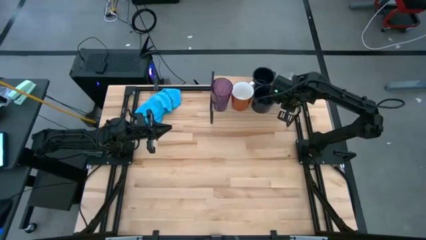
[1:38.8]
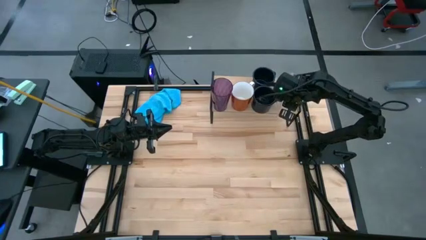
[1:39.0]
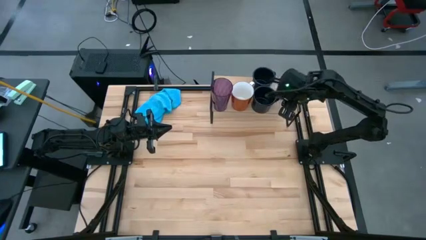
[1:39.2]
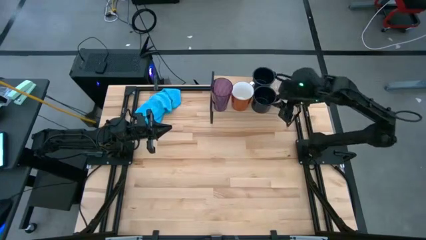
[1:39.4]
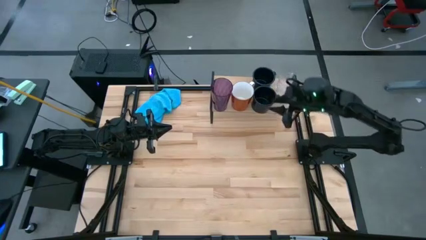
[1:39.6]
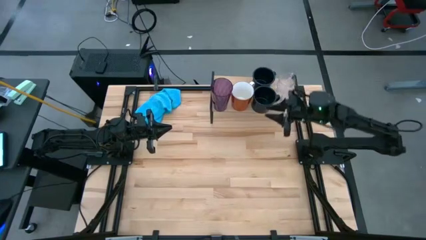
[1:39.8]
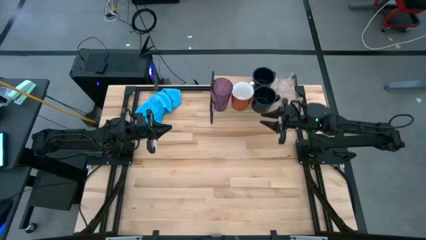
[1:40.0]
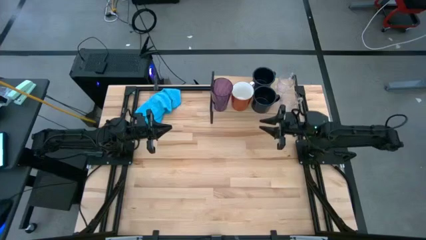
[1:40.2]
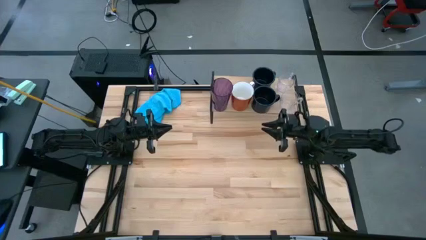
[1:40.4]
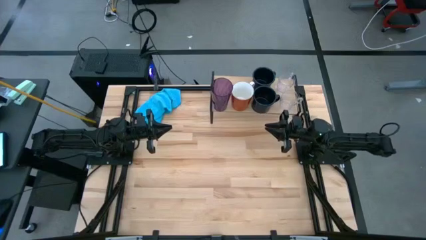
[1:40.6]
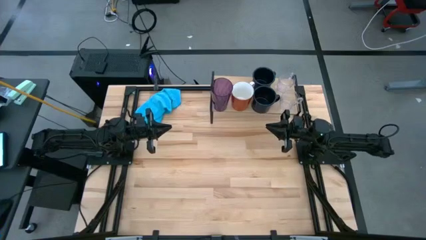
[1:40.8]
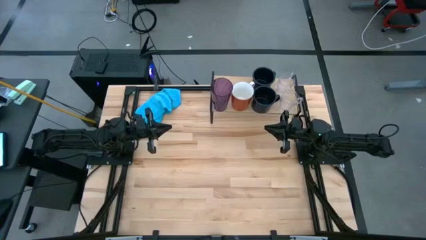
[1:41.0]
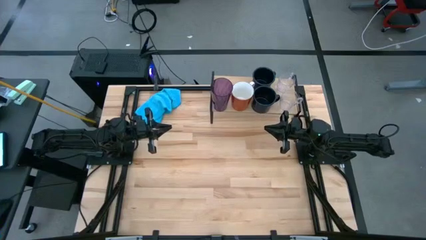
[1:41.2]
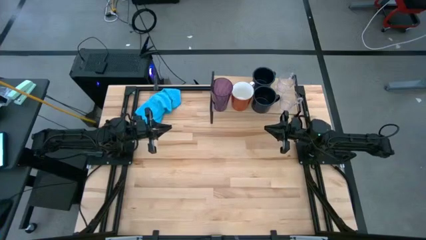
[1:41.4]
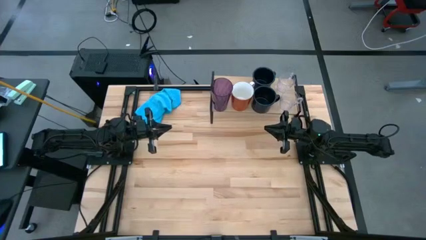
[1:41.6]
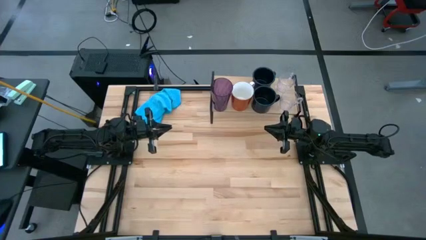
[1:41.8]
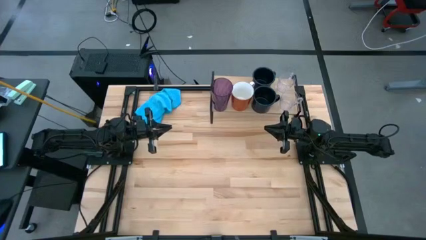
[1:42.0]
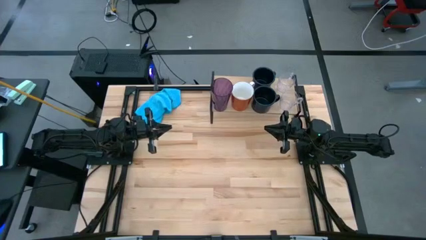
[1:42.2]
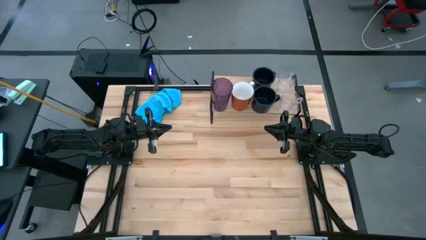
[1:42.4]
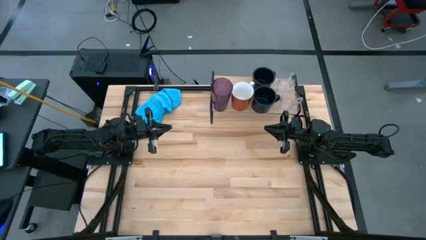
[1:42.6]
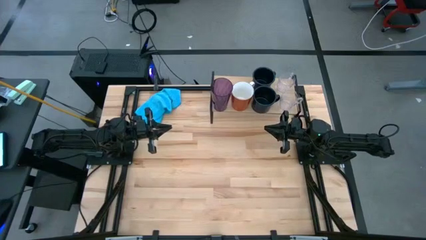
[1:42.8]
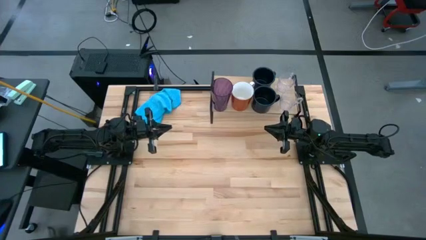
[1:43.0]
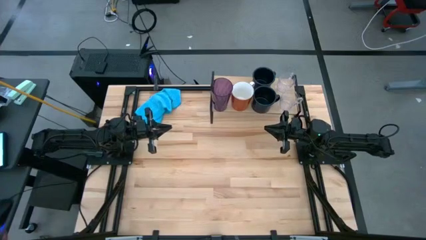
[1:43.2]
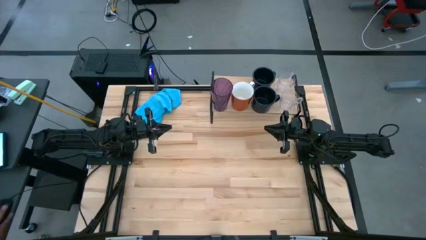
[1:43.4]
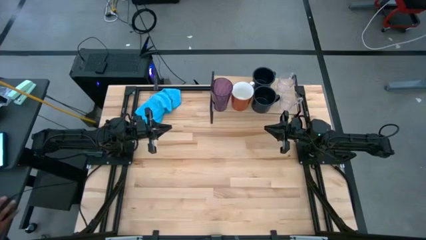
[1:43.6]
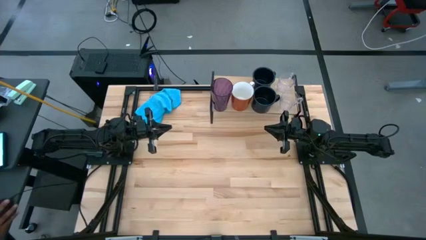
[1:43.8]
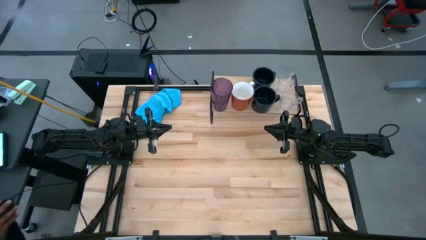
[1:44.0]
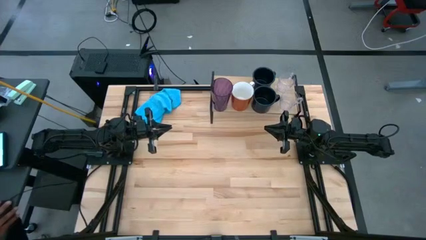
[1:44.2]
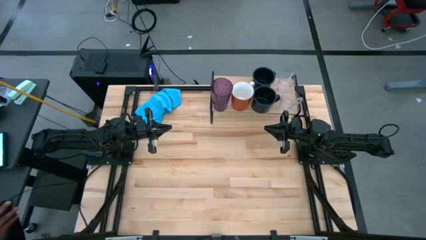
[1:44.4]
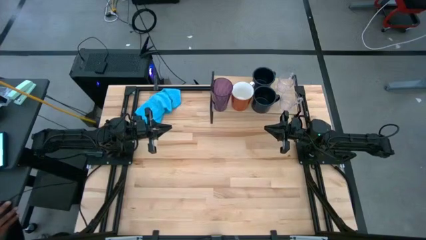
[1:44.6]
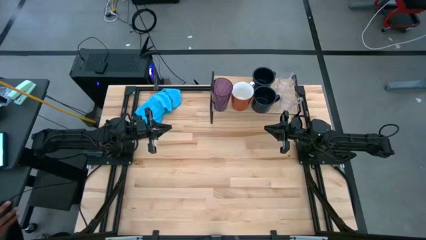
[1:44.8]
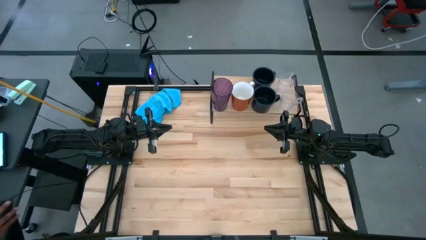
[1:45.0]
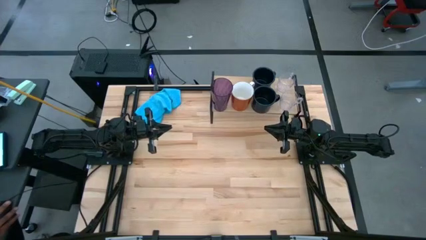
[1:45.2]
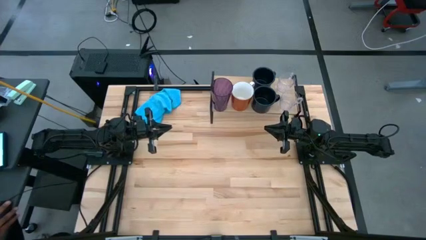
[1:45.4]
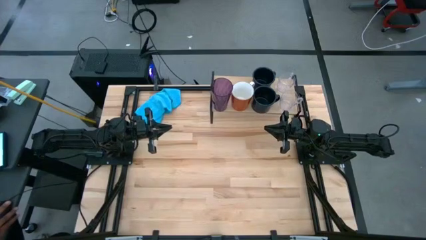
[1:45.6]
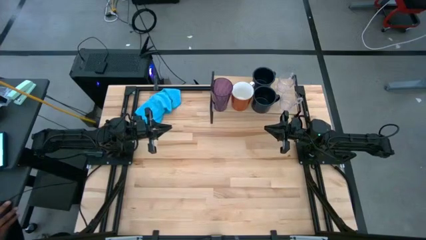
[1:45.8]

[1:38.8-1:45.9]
Task: Stack small to large cups/mugs on shelf
Return to Home Position

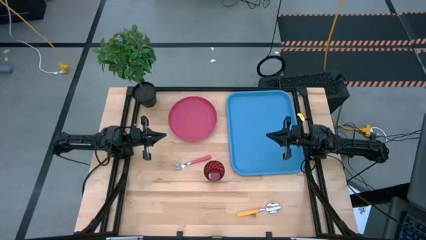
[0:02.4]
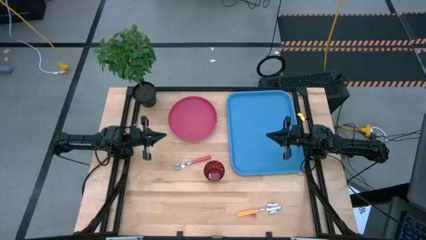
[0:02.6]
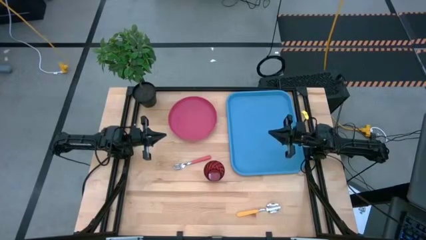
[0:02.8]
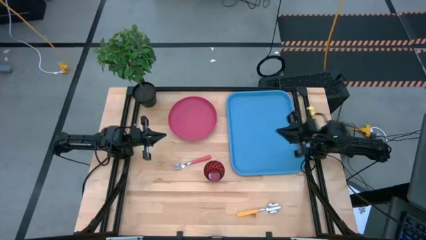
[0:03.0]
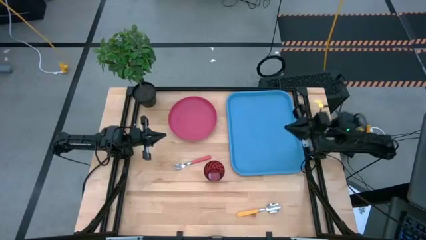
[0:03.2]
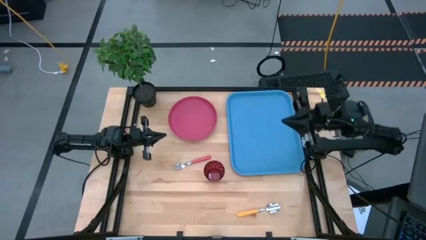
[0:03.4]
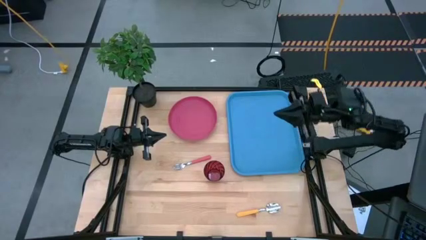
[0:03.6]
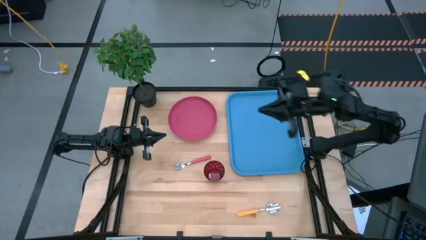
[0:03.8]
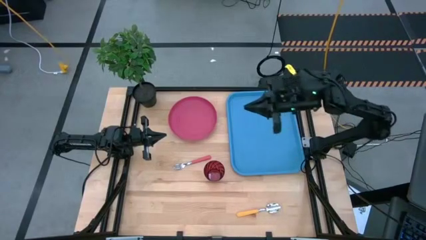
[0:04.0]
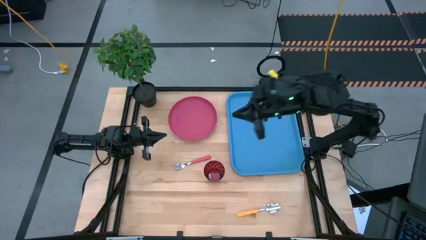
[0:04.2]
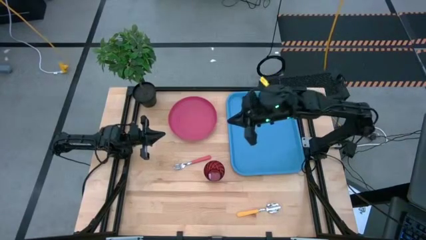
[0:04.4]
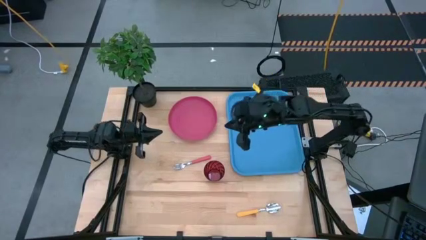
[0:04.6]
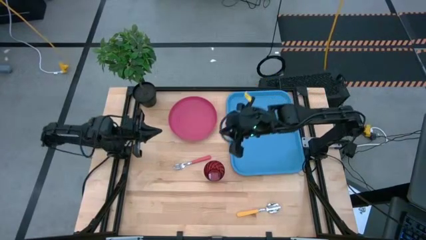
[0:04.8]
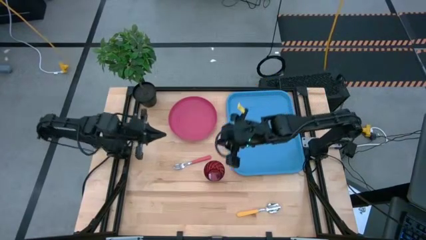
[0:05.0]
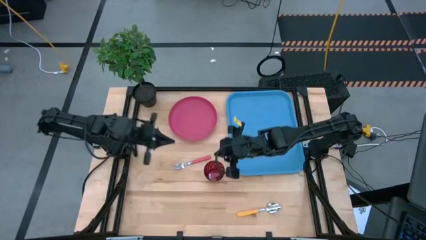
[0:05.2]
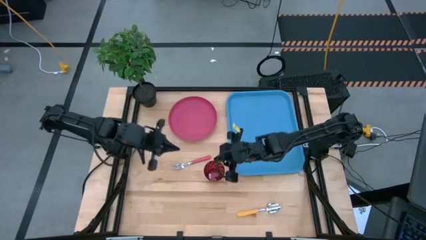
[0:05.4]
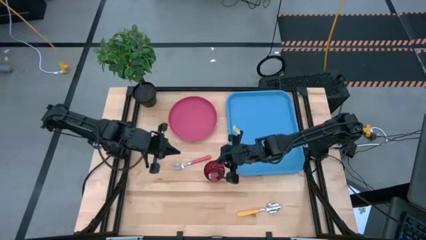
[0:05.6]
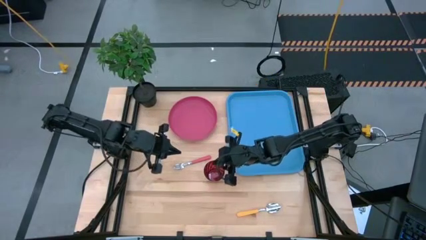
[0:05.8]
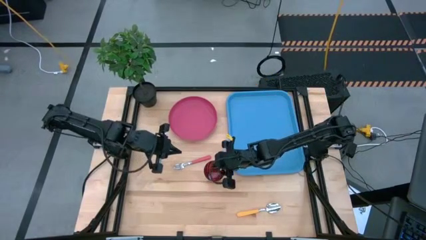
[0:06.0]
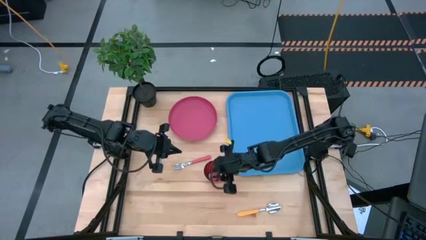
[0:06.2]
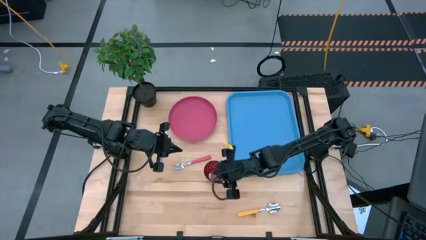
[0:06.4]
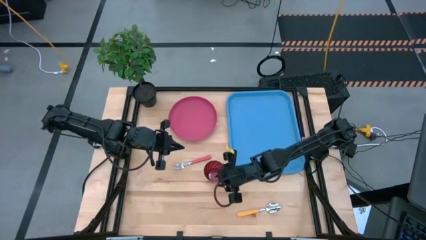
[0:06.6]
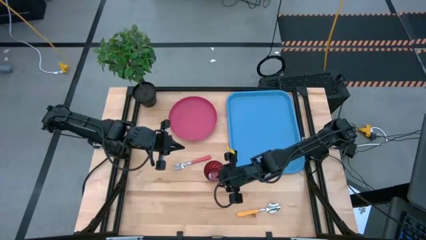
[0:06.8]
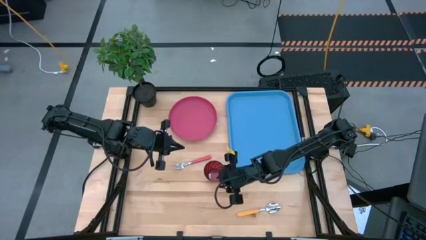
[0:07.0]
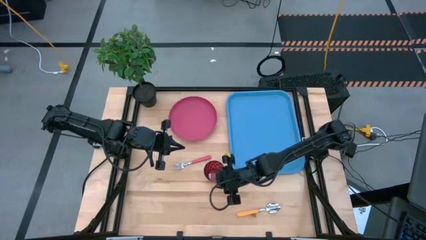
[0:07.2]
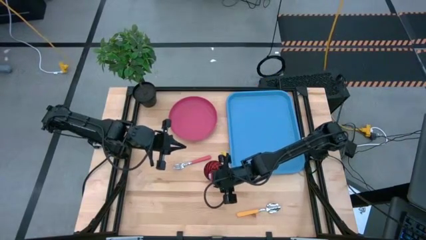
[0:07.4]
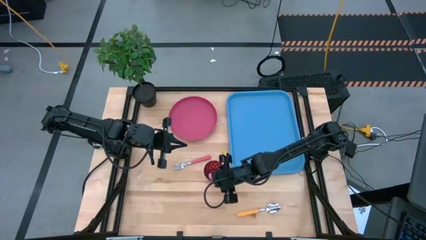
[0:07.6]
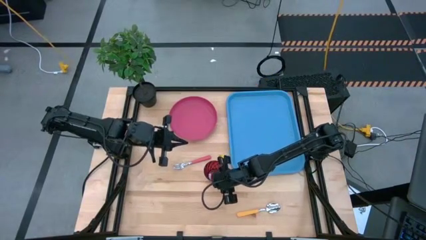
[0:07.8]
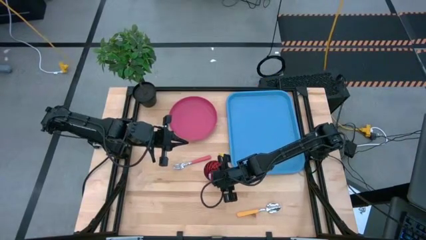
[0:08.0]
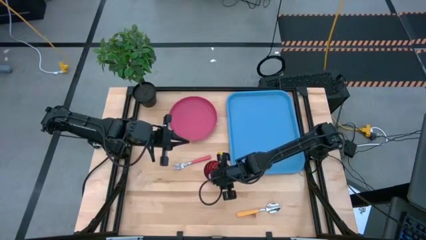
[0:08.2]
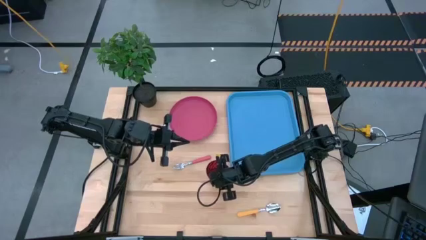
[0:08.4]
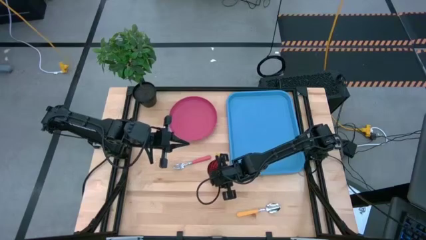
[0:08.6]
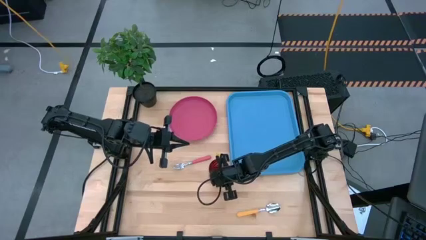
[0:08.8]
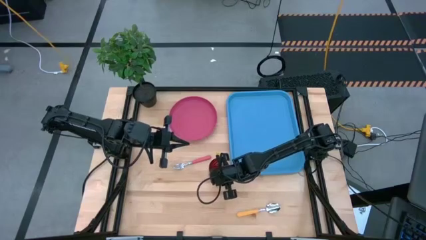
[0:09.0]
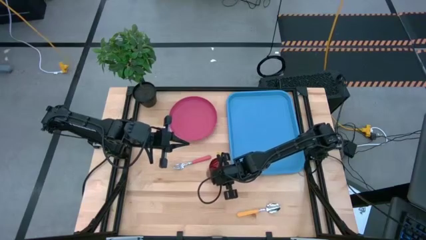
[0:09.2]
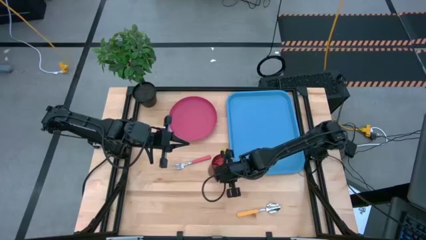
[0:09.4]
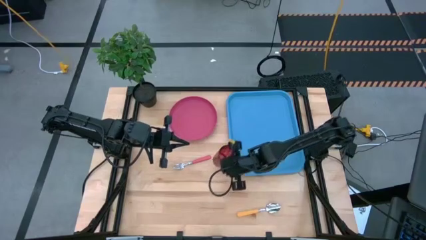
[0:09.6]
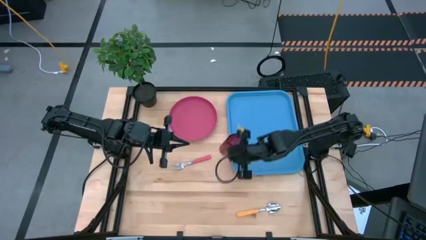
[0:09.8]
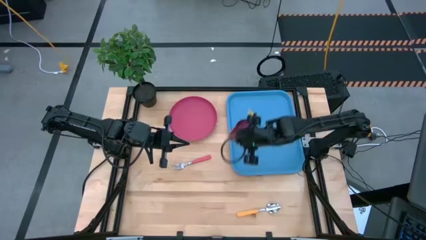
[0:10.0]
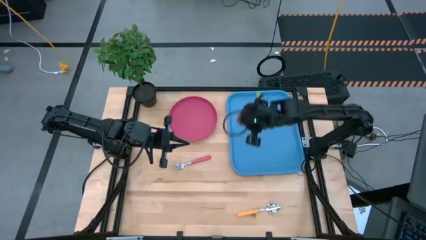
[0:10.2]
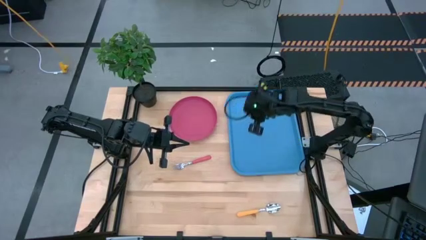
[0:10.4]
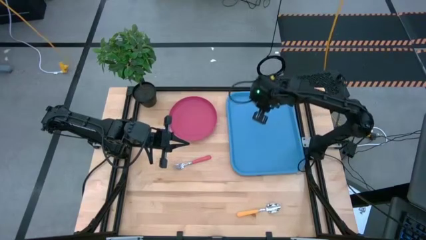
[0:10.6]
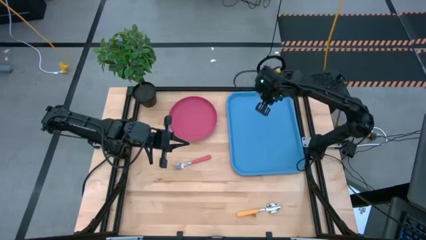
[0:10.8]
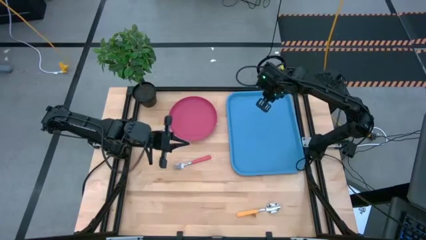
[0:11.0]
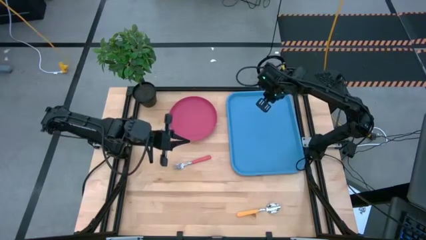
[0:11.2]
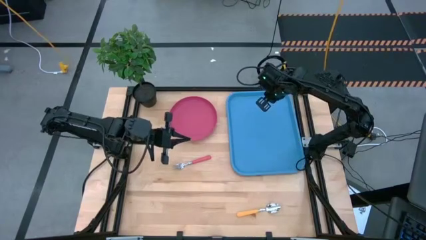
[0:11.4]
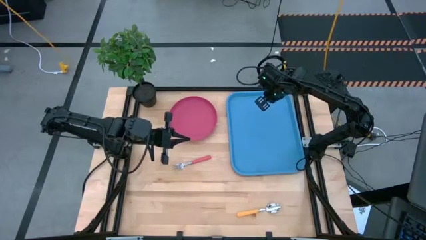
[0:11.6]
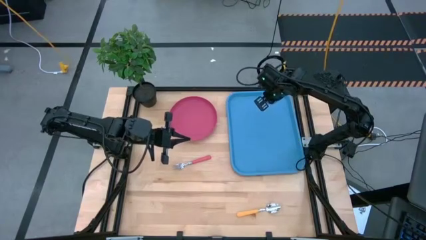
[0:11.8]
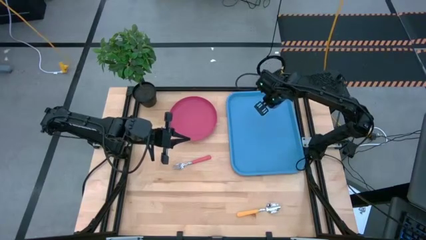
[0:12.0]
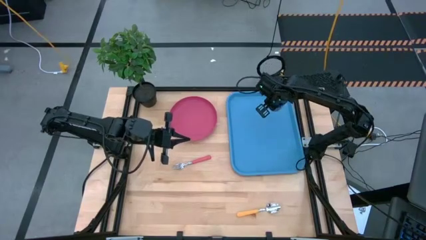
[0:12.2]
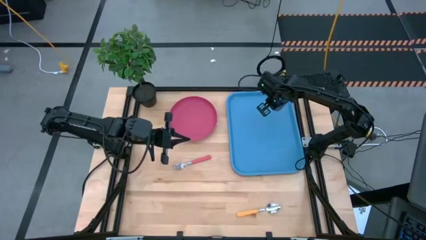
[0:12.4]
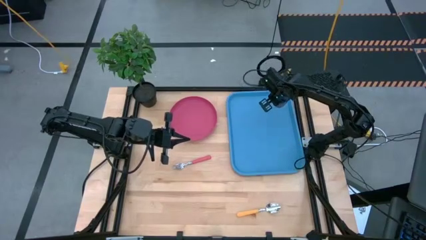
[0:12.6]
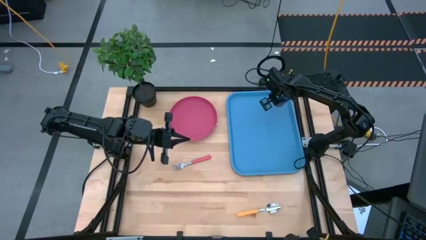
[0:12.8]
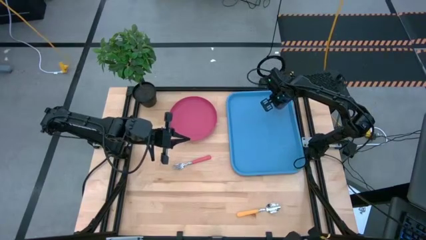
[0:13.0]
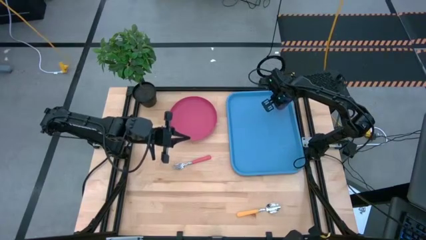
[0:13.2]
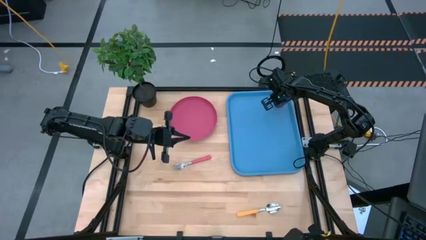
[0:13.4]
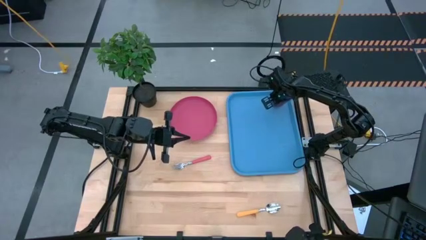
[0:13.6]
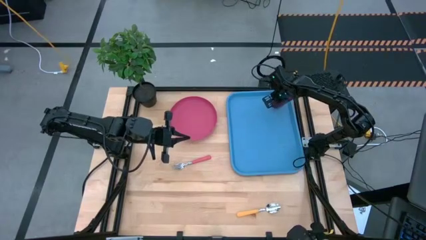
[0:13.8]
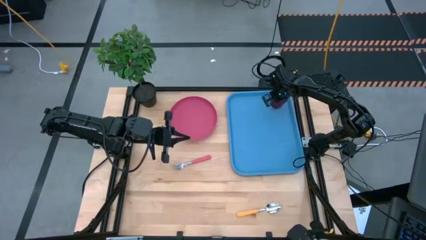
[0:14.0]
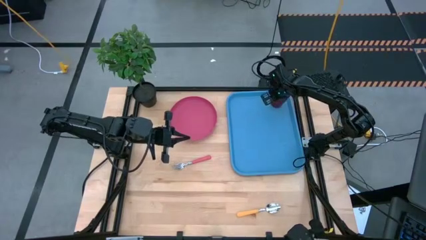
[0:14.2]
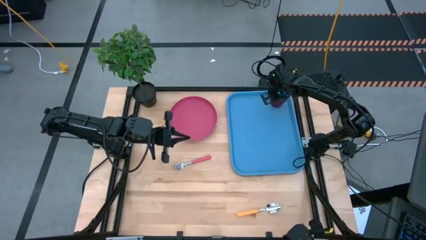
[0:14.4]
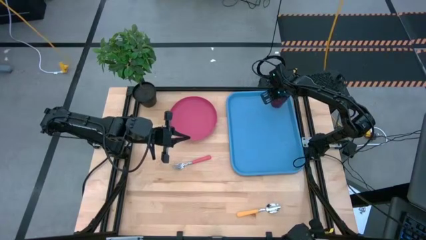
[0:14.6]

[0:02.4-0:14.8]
Task: Pick and place plate/cup/fork/spoon on tray
Put the red cup on the blue tray
